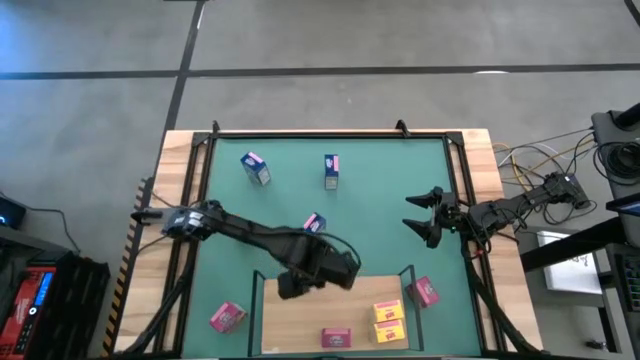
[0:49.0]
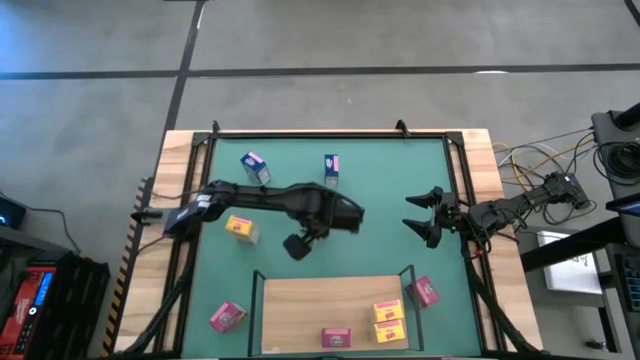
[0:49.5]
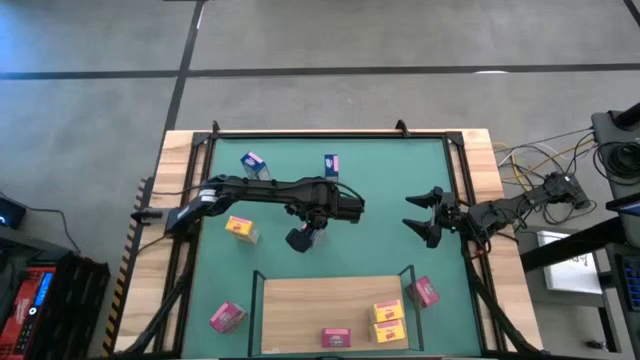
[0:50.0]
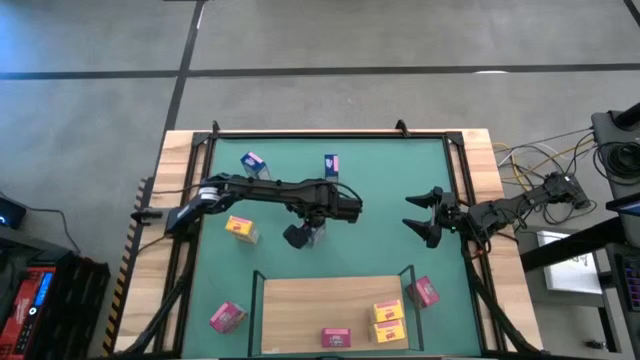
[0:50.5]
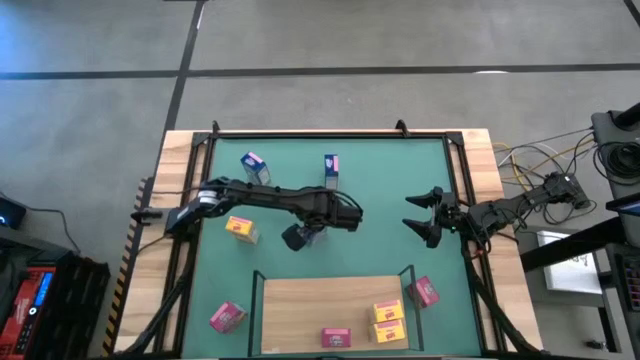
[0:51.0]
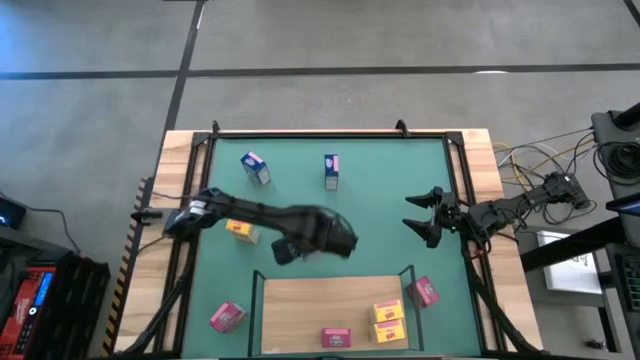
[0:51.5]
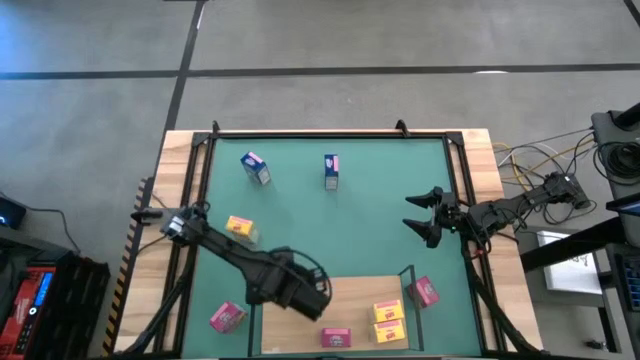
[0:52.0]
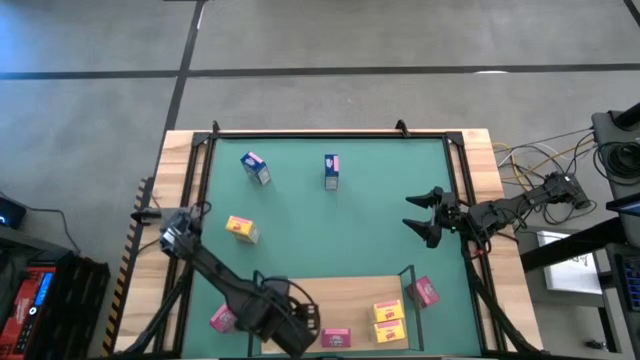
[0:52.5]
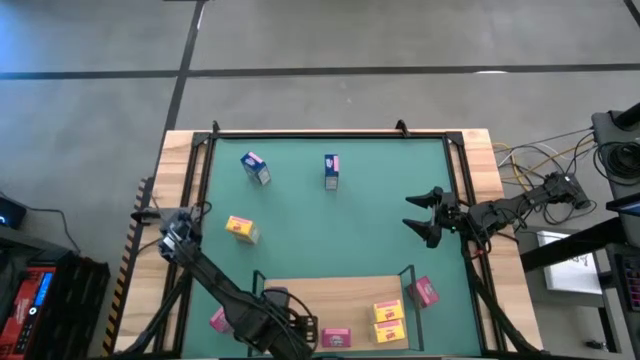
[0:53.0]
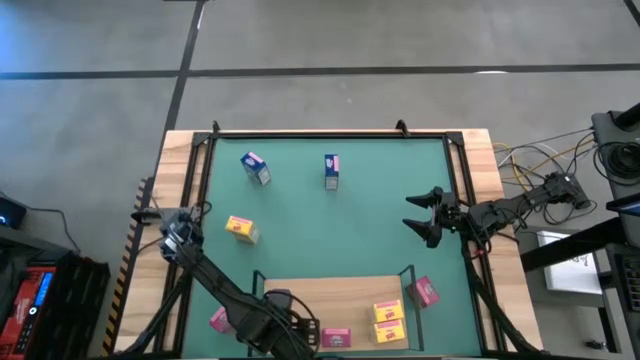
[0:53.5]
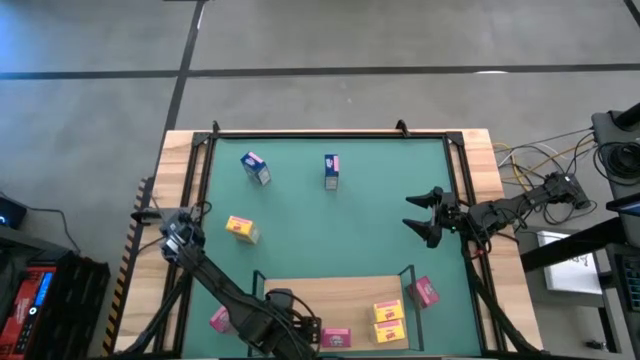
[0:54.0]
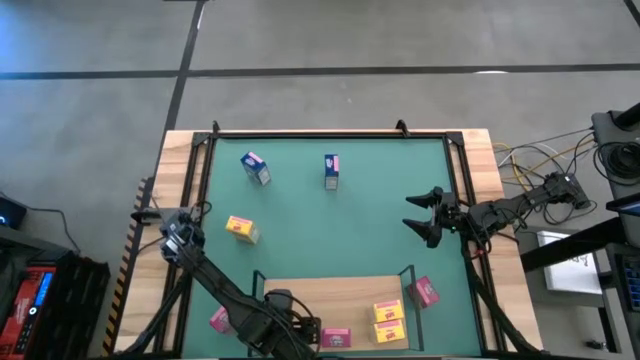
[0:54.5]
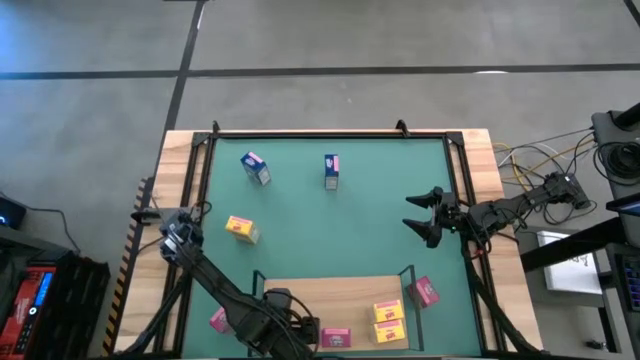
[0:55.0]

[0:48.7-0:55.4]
Task: Stack cereal on shelf
Put the bottom blue cereal box on the shelf

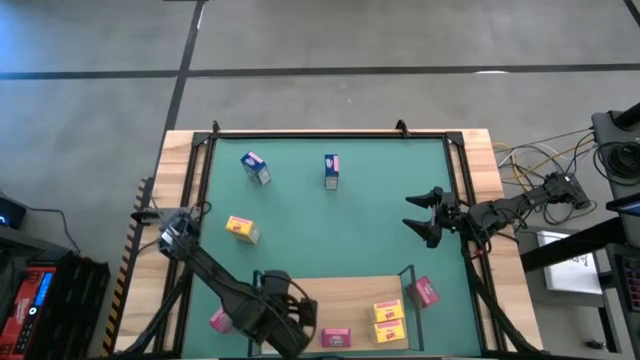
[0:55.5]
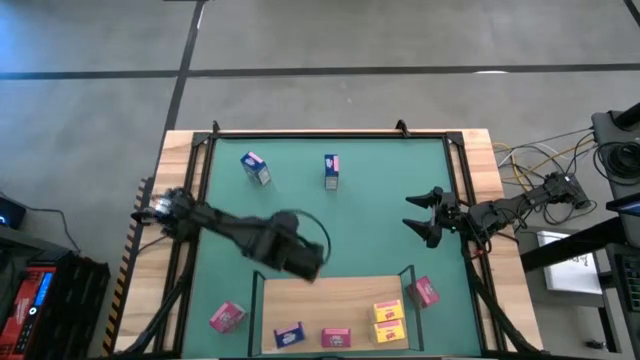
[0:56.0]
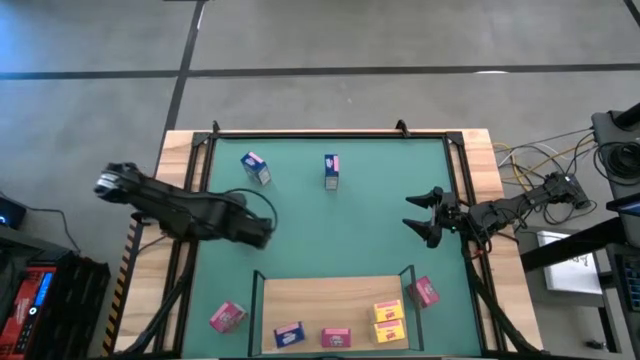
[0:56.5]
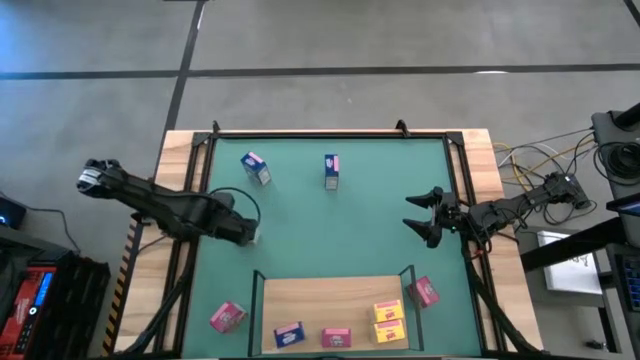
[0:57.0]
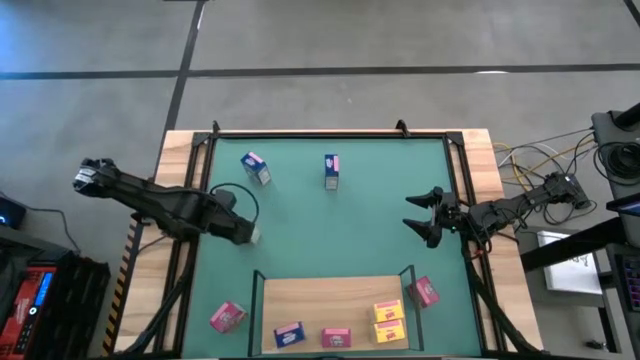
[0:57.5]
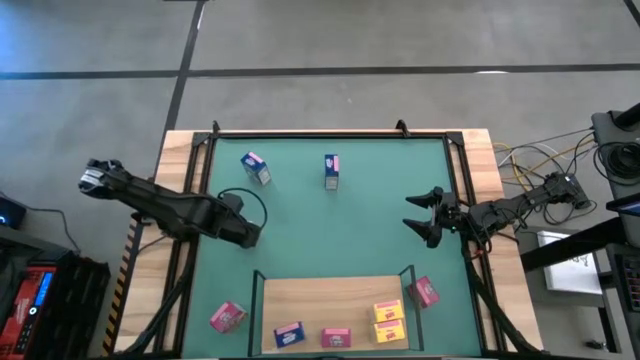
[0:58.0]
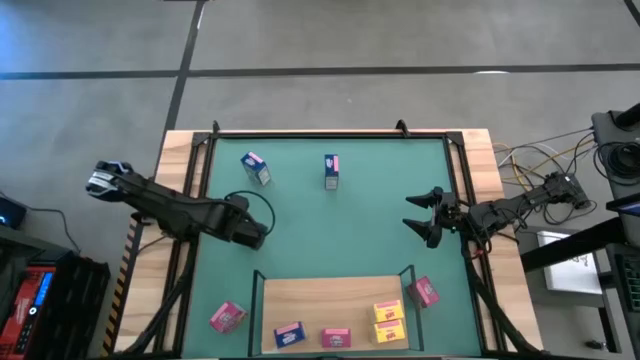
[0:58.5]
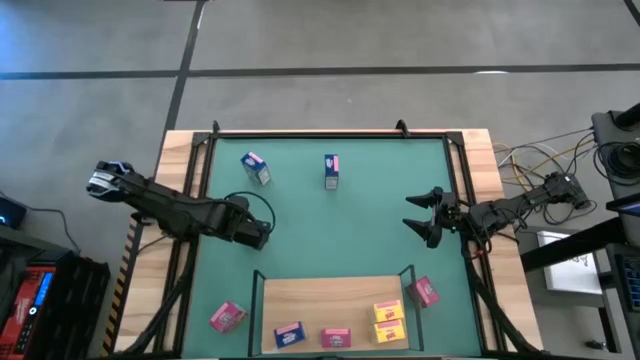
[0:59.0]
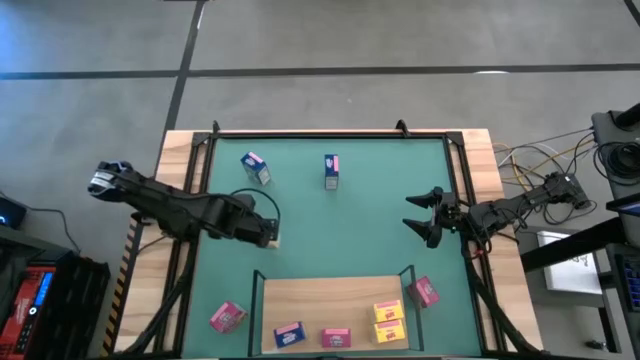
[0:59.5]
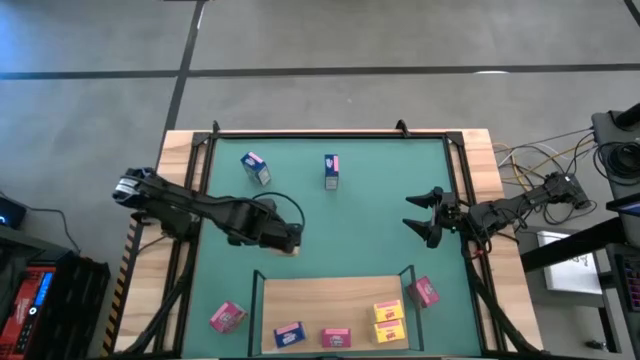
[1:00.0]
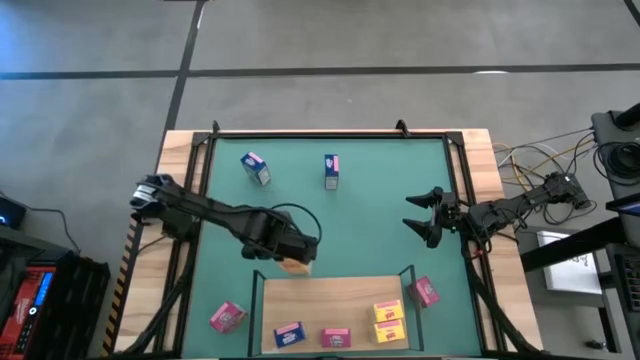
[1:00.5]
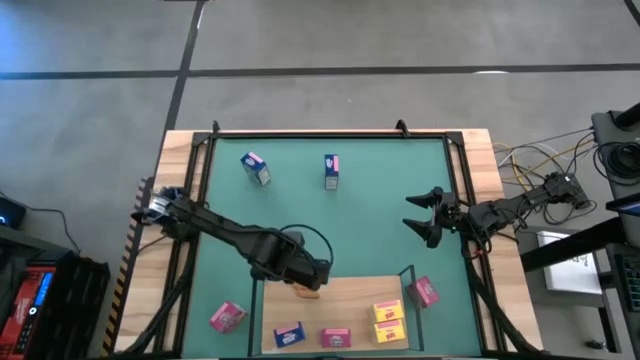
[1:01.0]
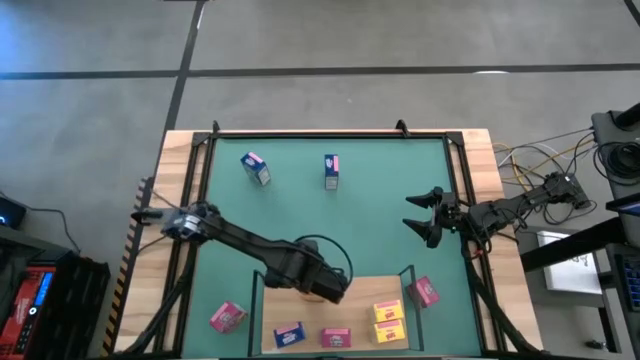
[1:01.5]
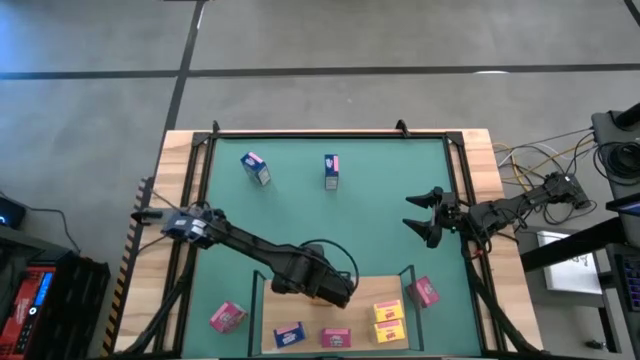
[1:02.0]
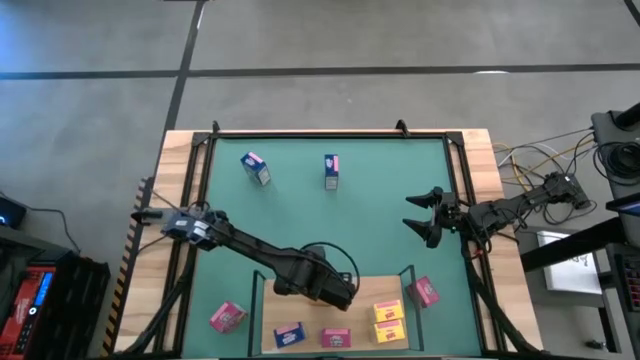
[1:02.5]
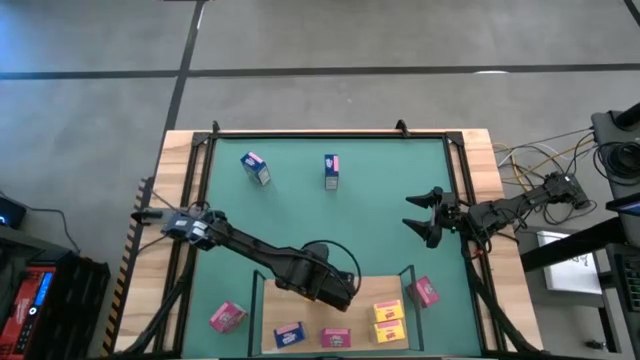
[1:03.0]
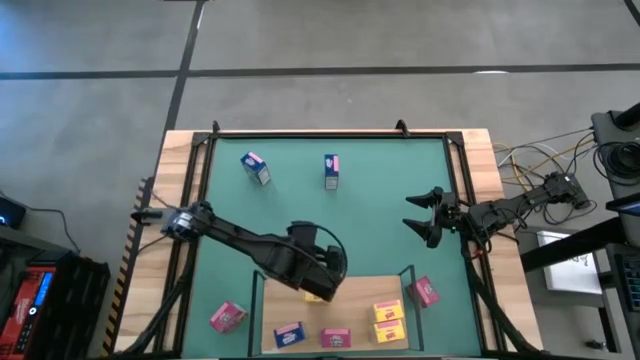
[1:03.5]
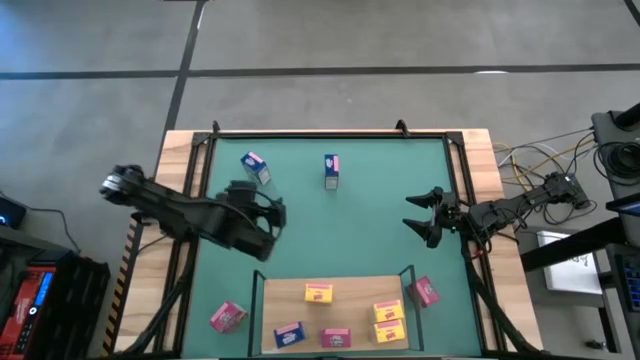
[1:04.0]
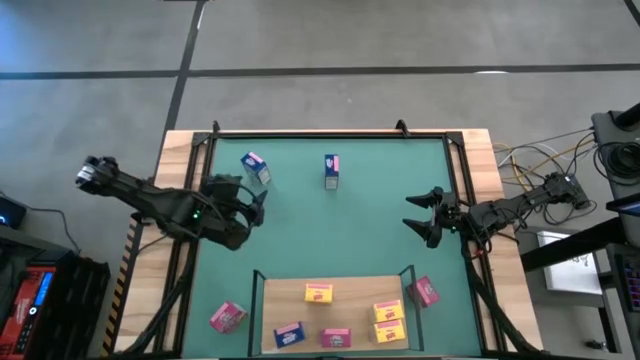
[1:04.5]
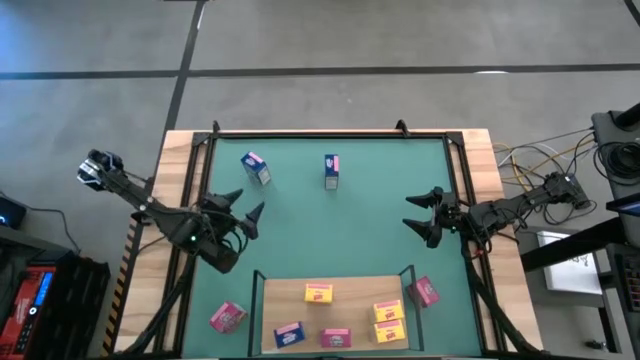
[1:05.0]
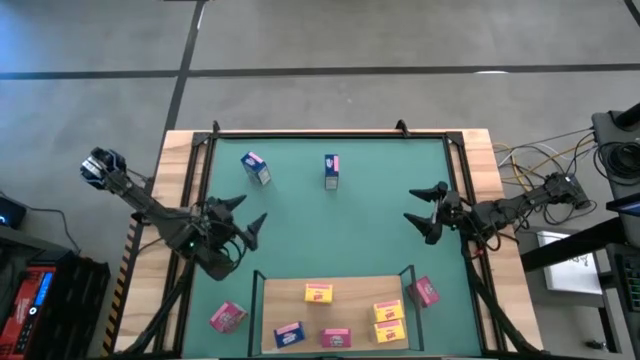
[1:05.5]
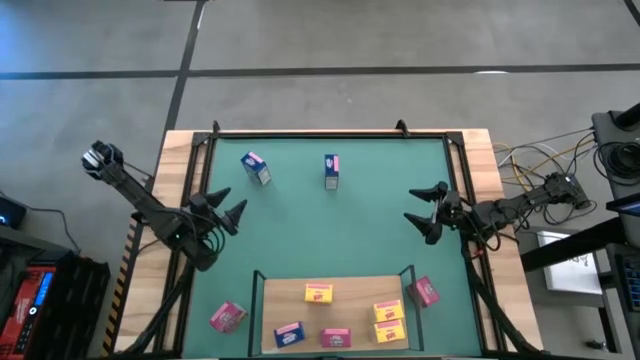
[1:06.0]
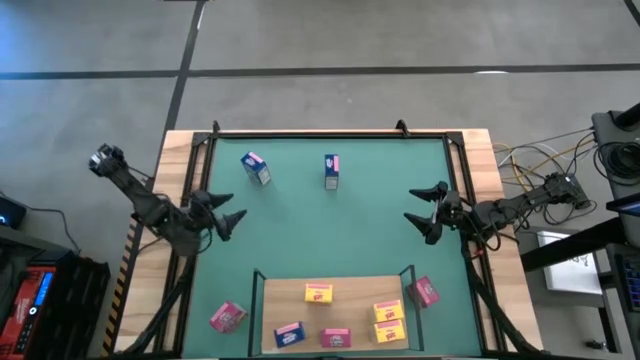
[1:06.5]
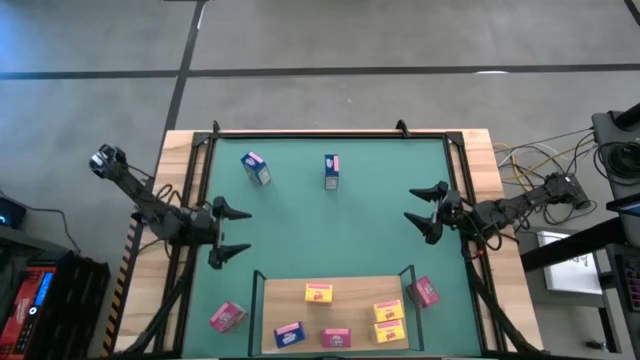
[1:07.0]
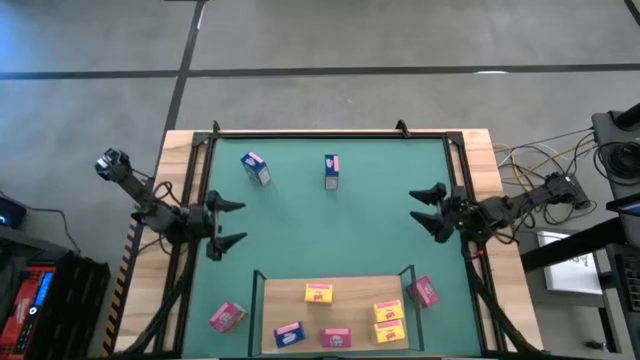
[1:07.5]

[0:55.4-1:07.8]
Put the yellow cereal box on the shelf aligned with the other yellow cereal boxes

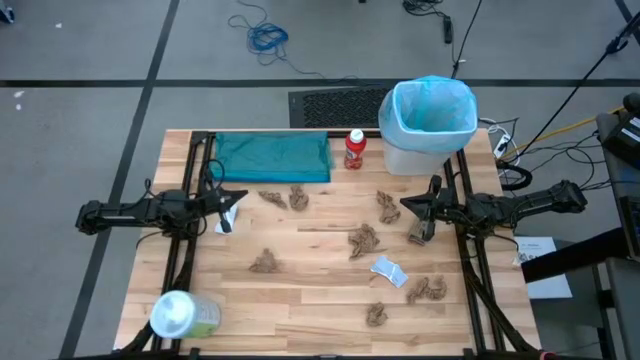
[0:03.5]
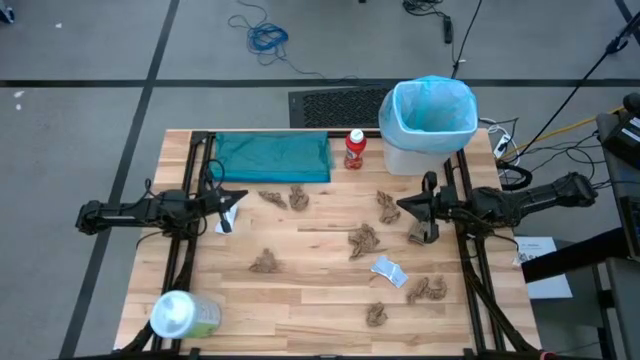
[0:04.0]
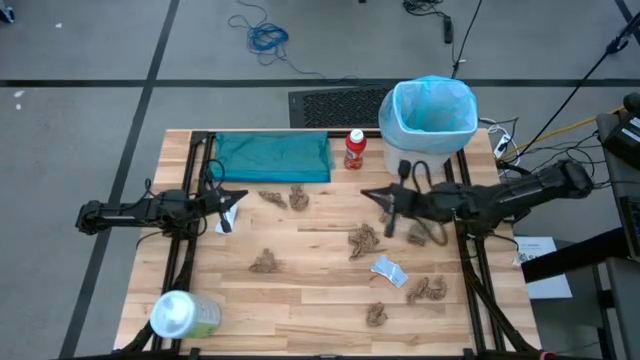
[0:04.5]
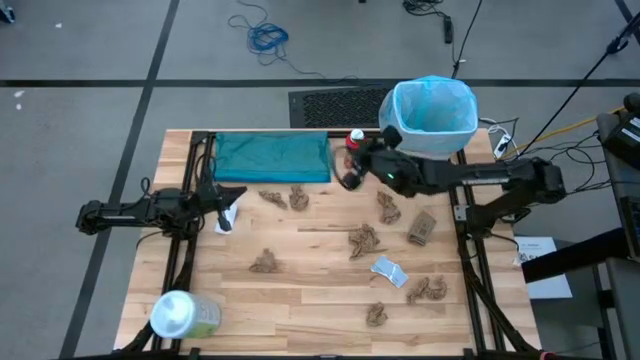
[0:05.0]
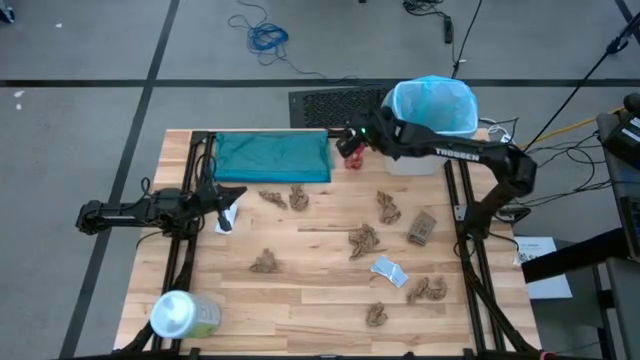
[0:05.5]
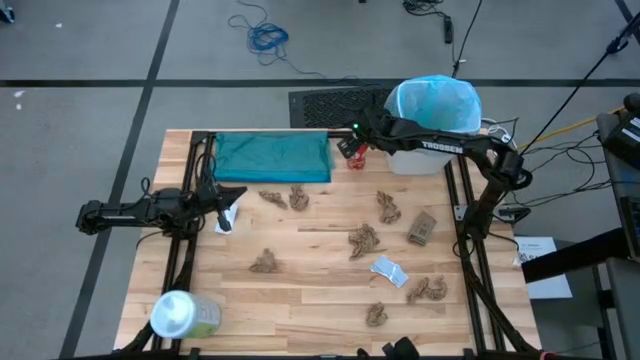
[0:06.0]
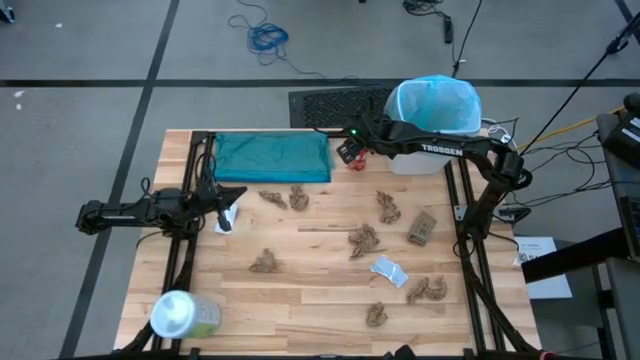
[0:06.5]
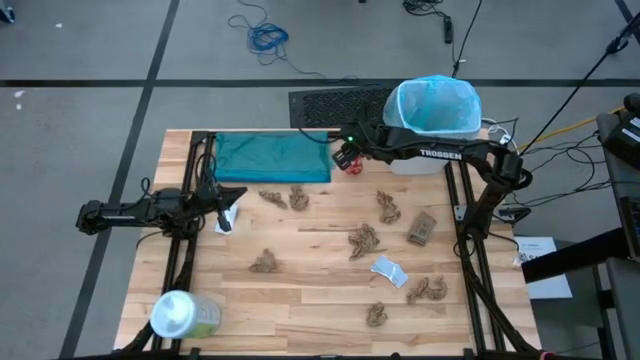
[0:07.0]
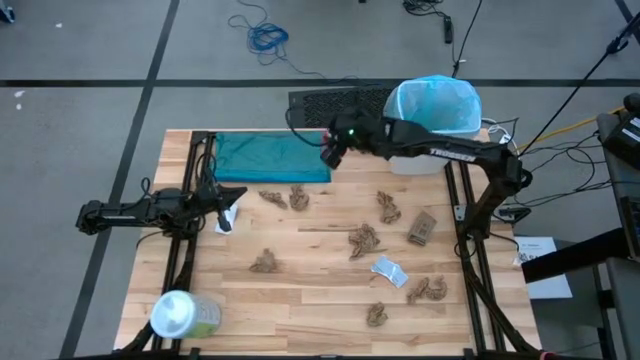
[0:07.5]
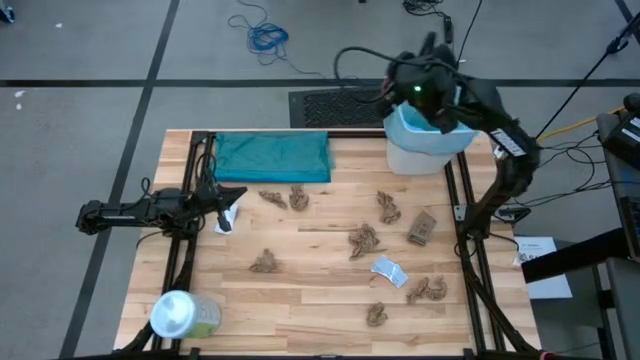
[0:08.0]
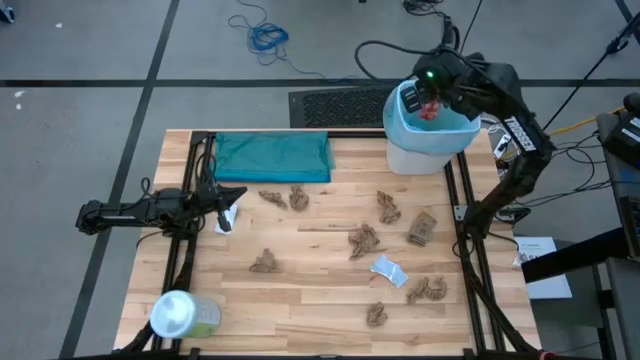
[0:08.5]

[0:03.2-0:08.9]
Task: place trash/remove bag and relplace
Put the red plastic bottle into the trash bin
